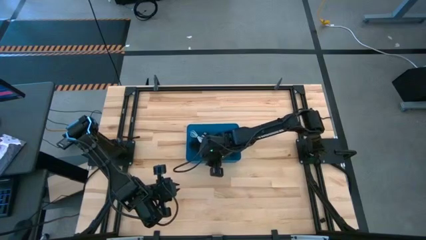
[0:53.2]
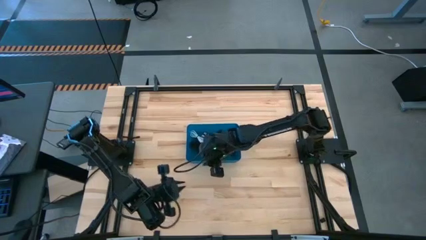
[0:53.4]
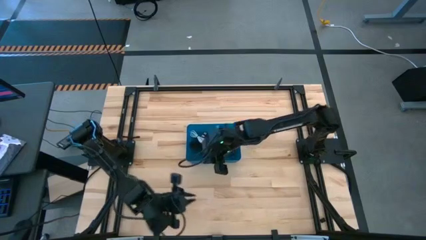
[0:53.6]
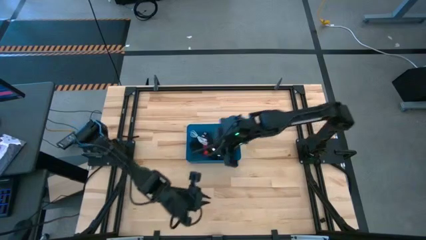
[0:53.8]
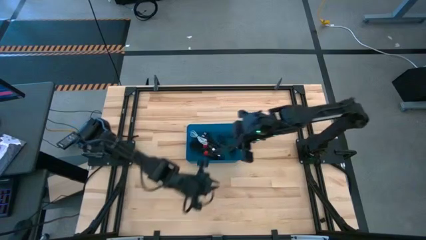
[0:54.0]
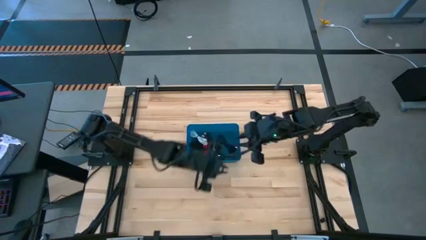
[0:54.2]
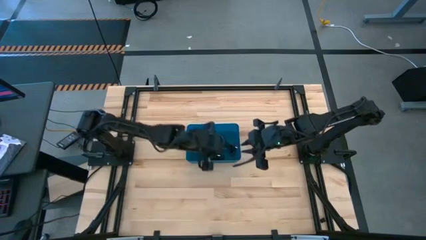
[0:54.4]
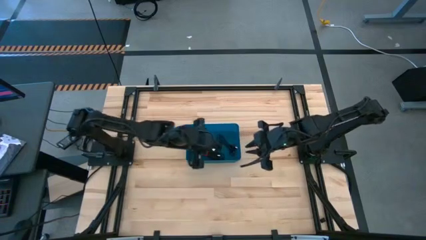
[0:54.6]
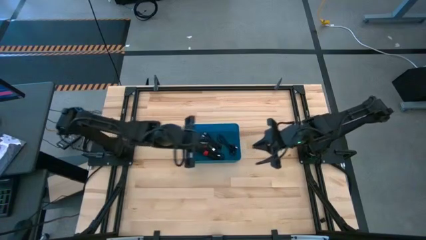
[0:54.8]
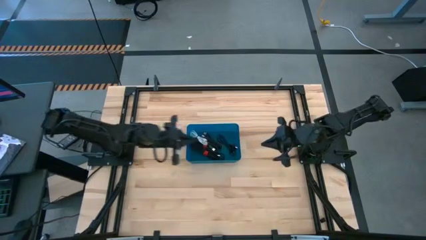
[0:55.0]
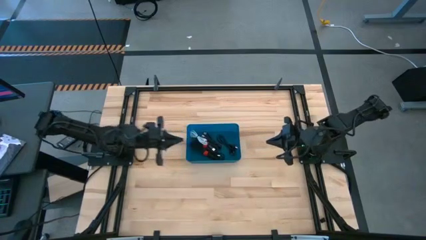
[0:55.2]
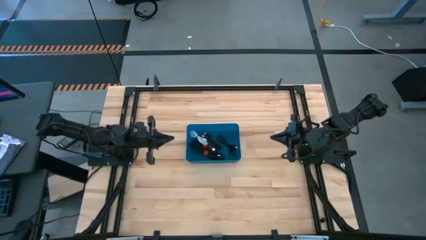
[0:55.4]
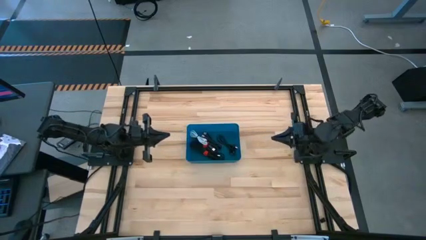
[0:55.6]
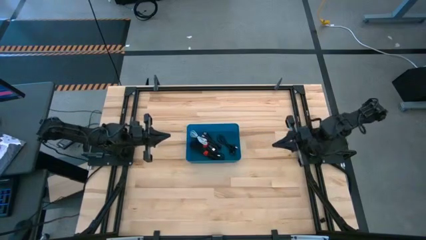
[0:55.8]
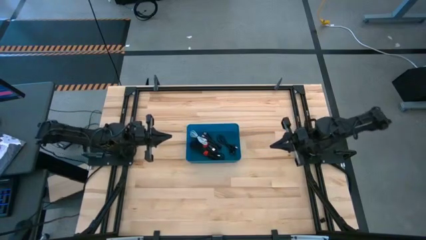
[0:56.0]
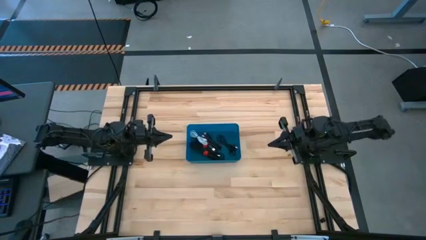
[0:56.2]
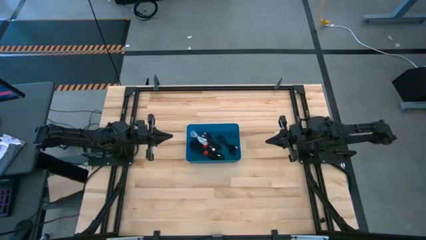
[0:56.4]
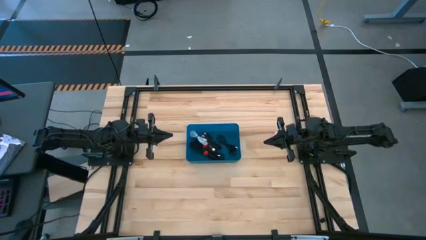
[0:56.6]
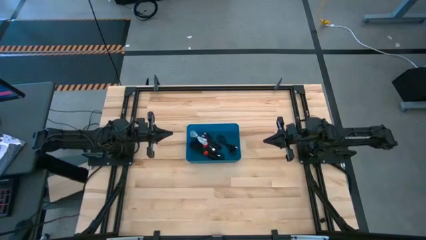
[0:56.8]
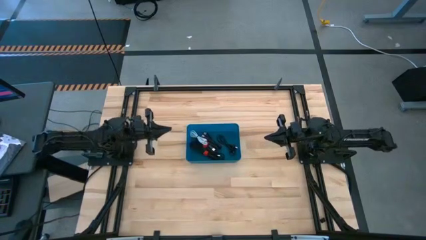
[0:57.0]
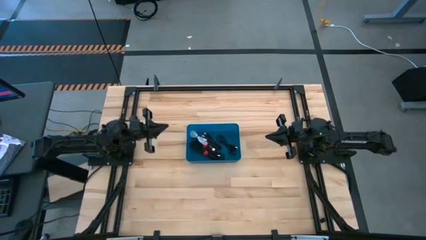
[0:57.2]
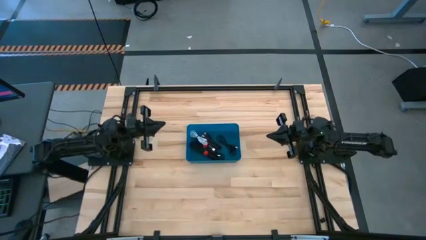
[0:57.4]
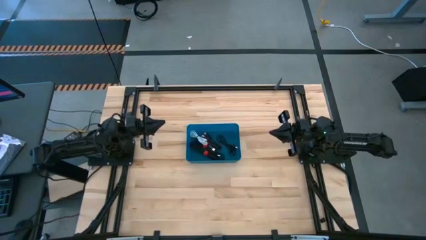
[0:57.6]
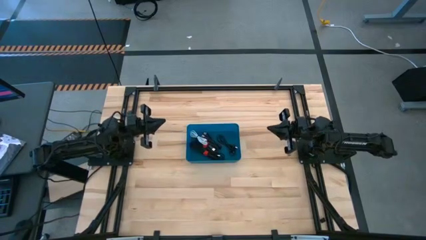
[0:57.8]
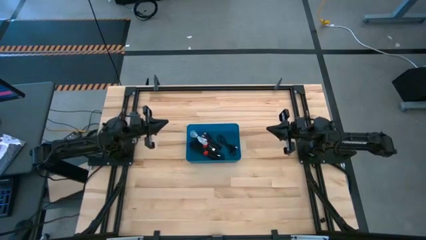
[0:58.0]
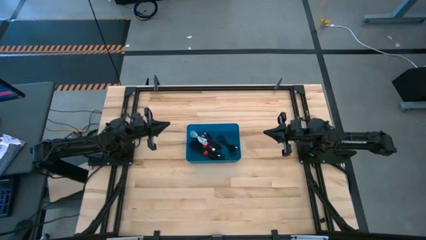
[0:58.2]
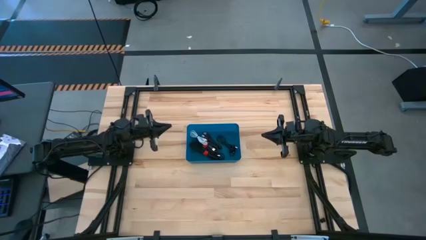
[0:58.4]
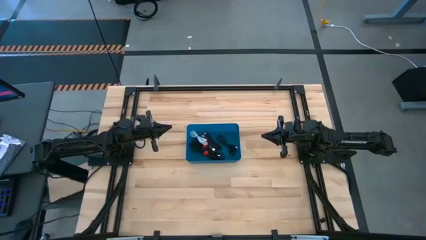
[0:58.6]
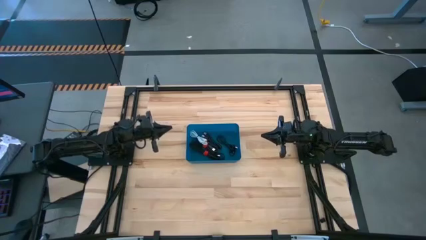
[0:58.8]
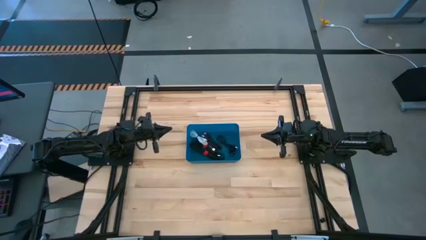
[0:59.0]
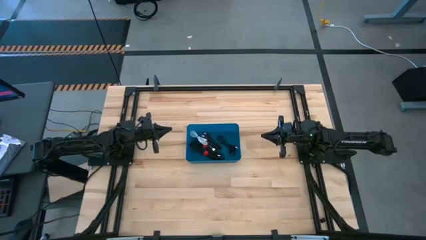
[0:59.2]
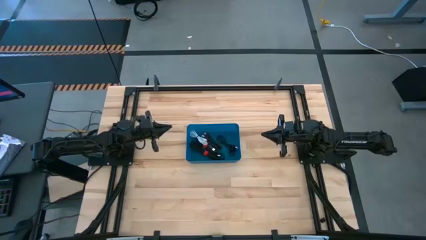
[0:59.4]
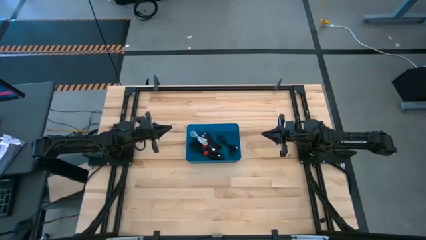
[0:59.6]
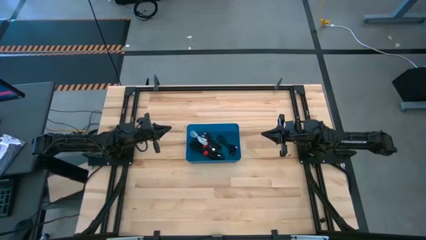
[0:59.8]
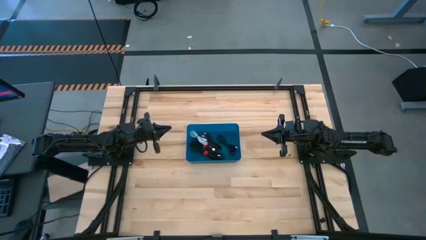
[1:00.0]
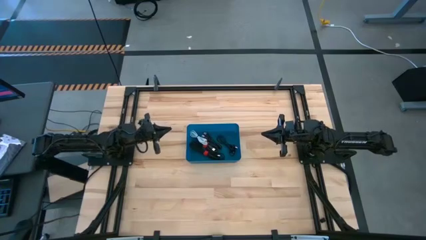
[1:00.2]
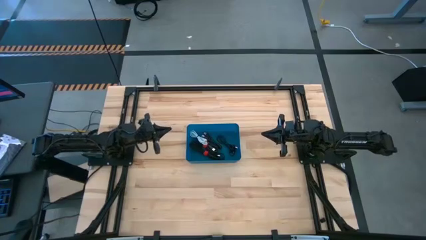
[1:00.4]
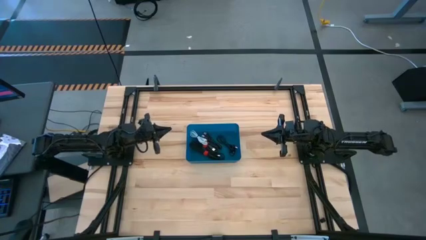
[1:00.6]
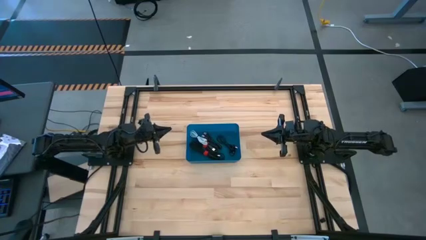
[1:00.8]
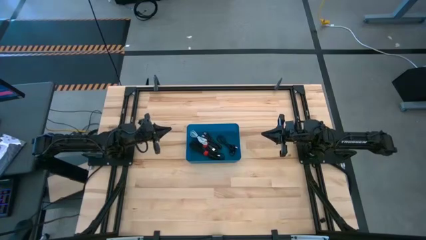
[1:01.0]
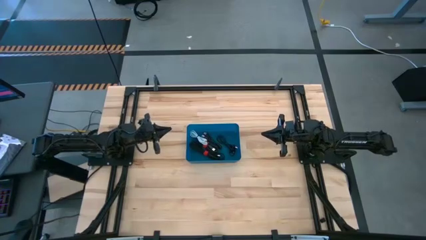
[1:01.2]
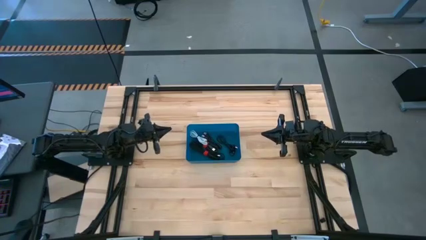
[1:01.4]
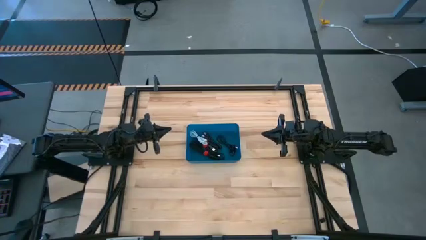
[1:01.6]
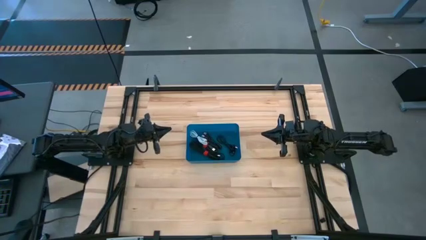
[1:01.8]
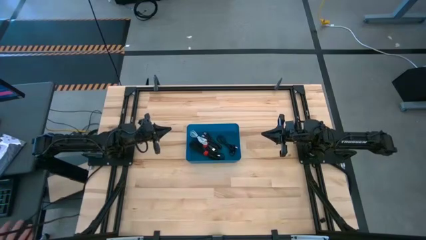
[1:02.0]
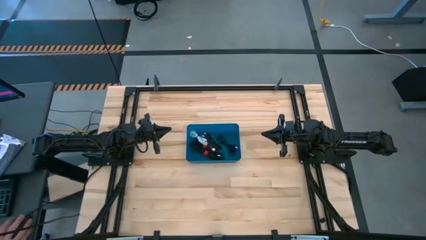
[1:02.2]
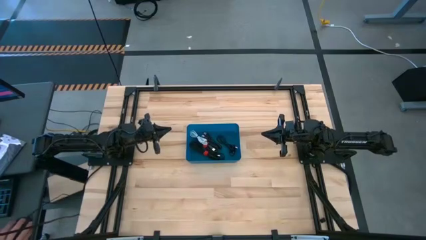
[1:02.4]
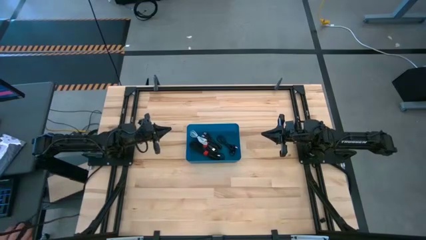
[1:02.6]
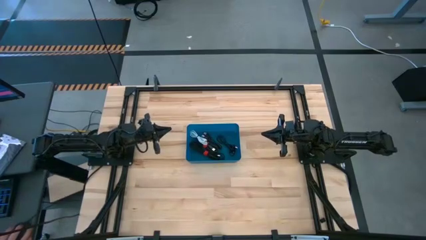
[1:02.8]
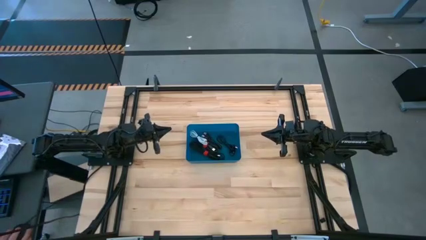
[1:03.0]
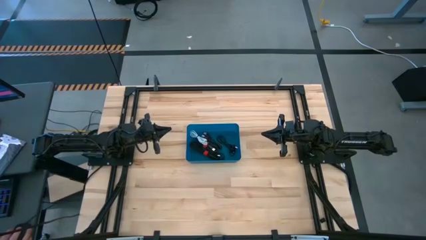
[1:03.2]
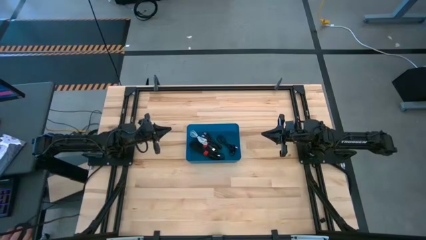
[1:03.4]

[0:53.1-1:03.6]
Task: Pick and place USB-C Cables
Return to Home Position
